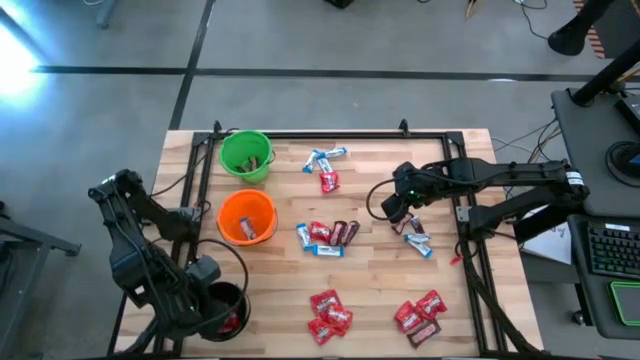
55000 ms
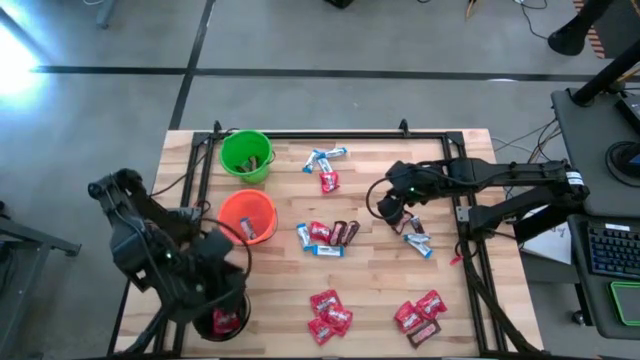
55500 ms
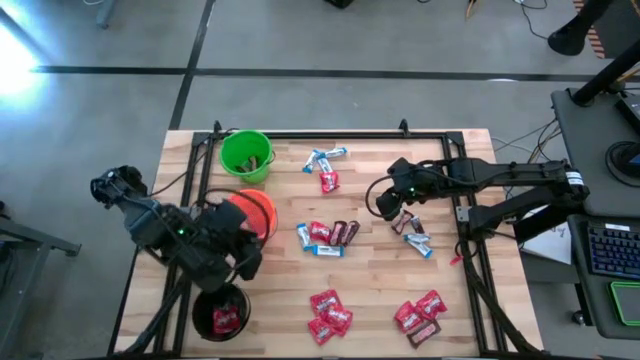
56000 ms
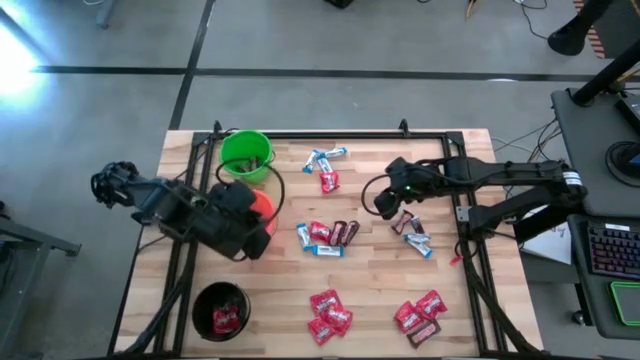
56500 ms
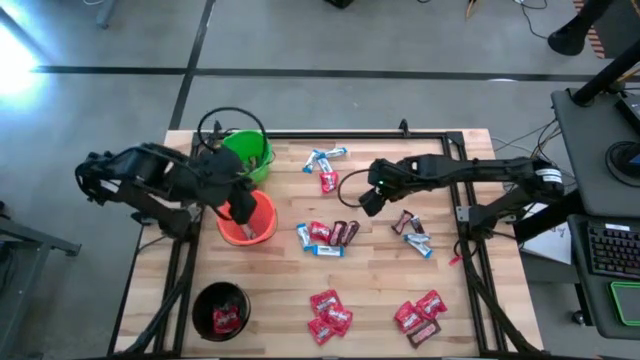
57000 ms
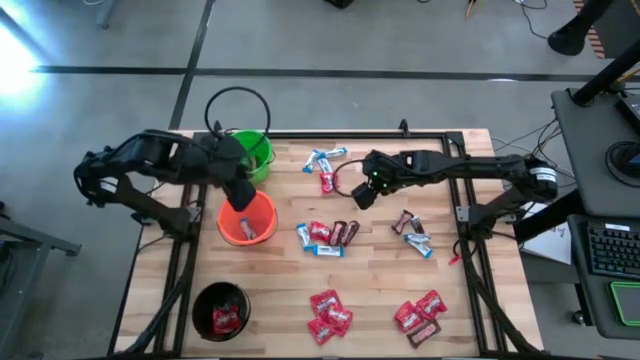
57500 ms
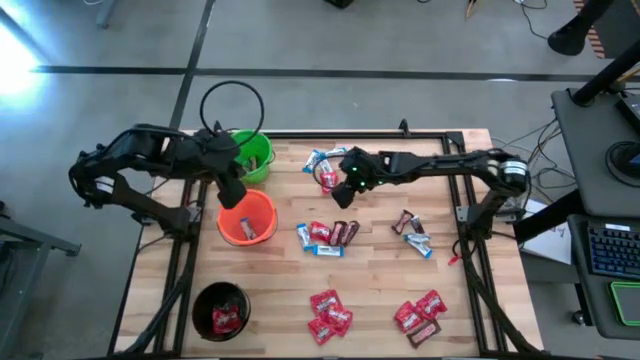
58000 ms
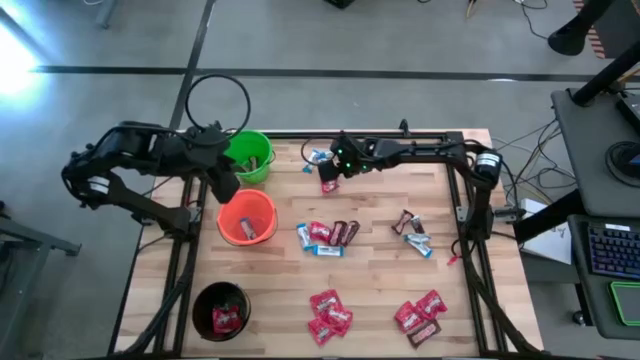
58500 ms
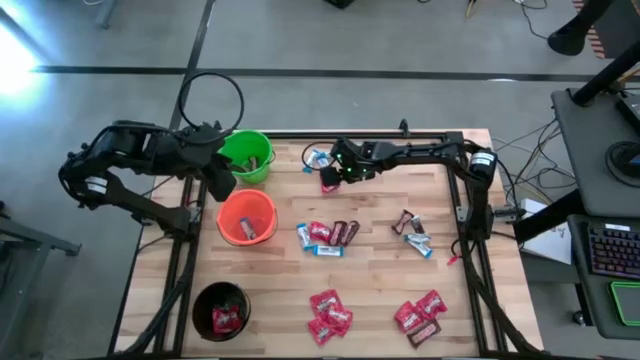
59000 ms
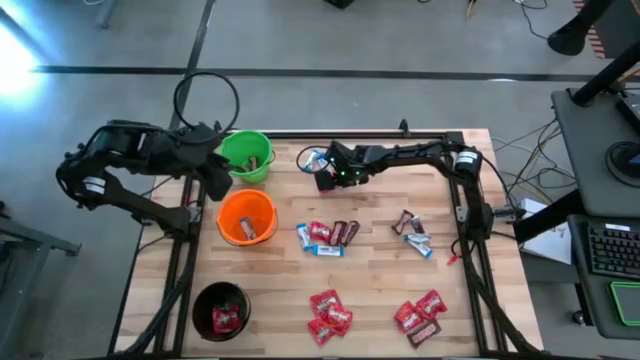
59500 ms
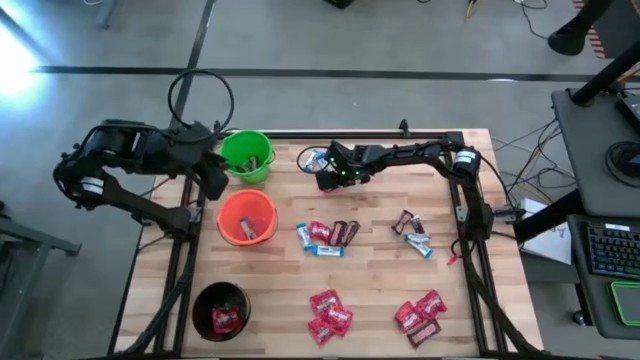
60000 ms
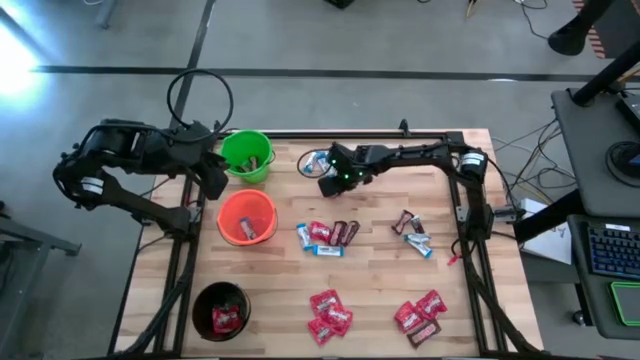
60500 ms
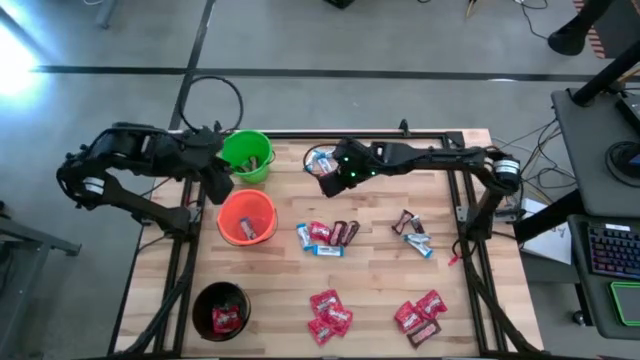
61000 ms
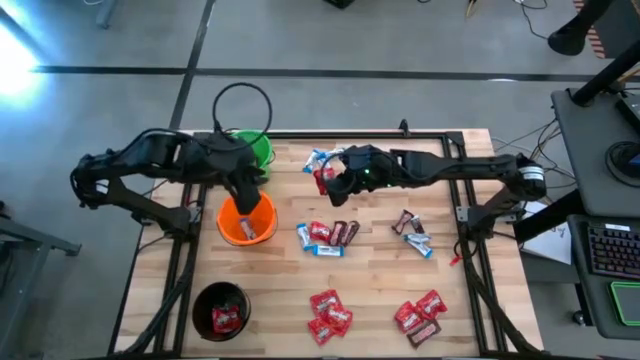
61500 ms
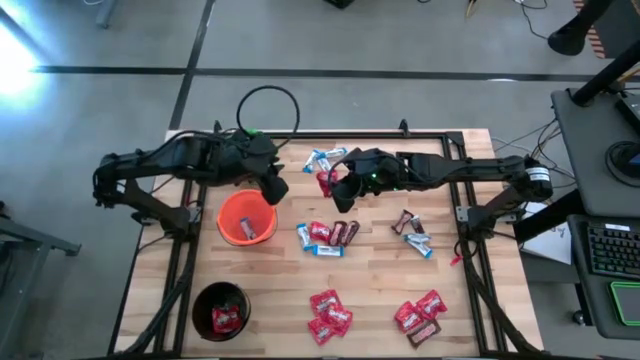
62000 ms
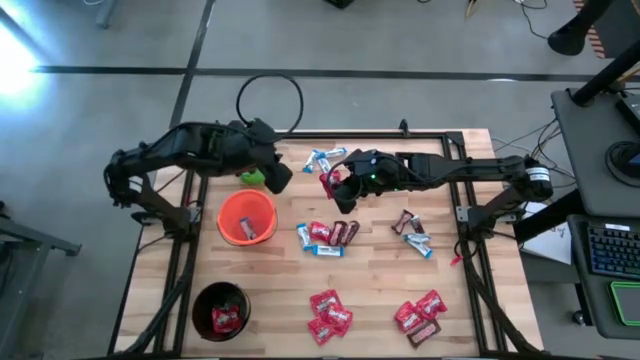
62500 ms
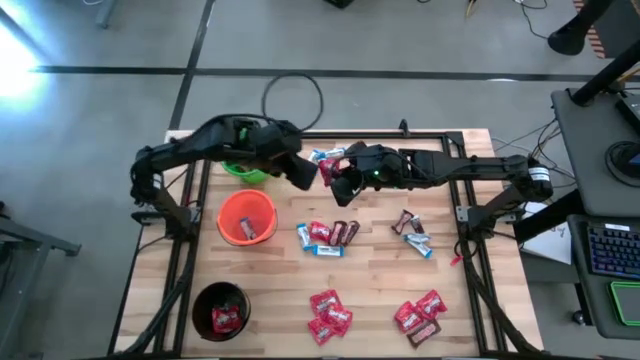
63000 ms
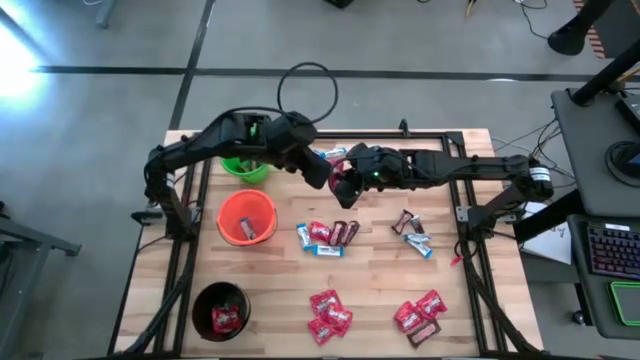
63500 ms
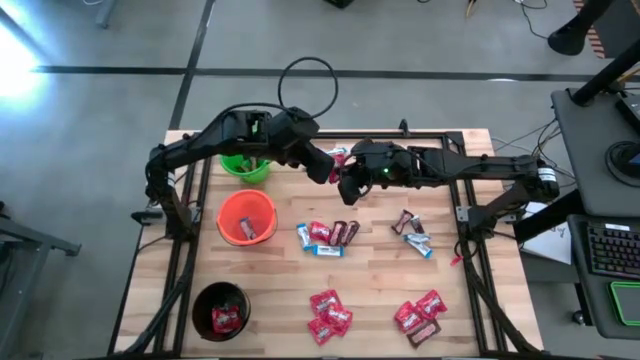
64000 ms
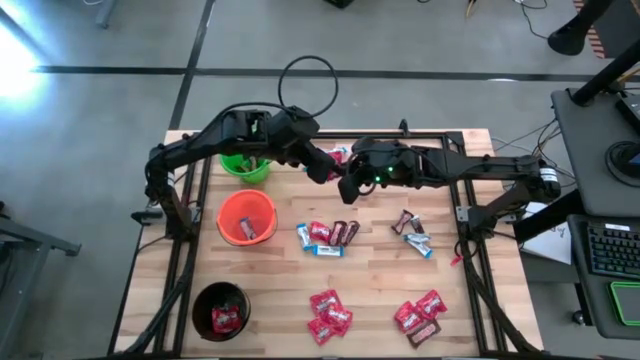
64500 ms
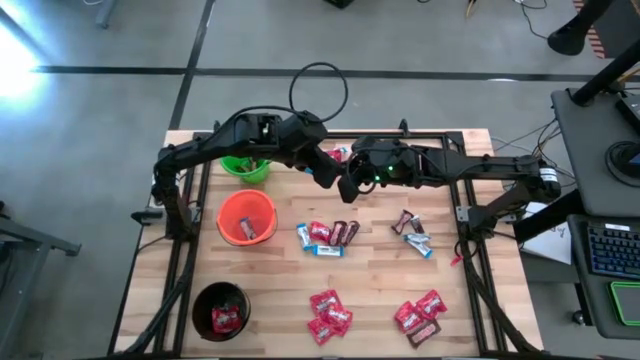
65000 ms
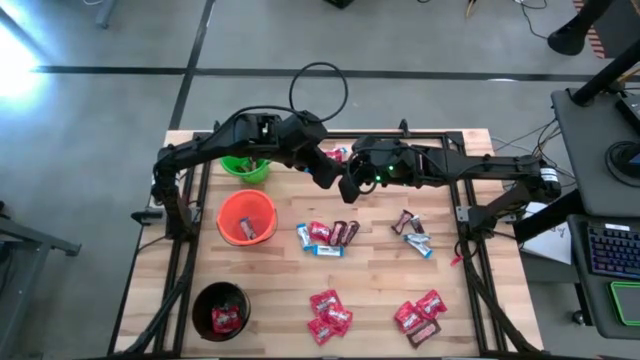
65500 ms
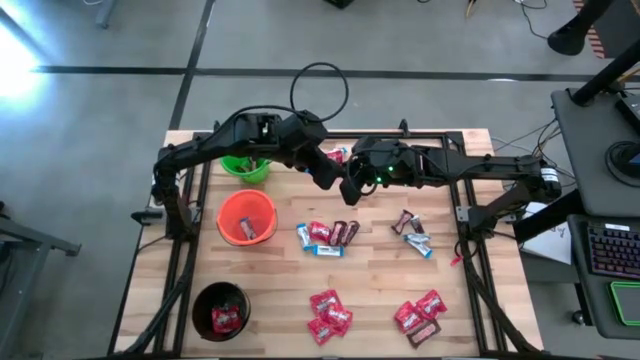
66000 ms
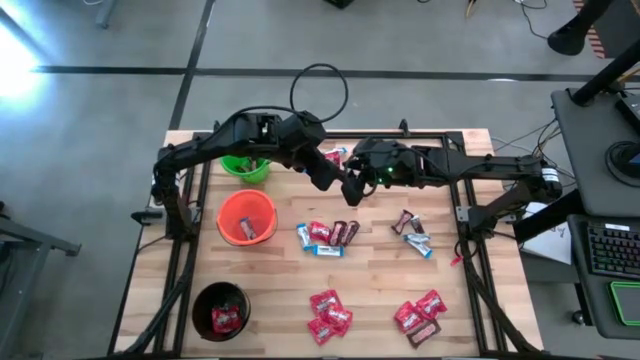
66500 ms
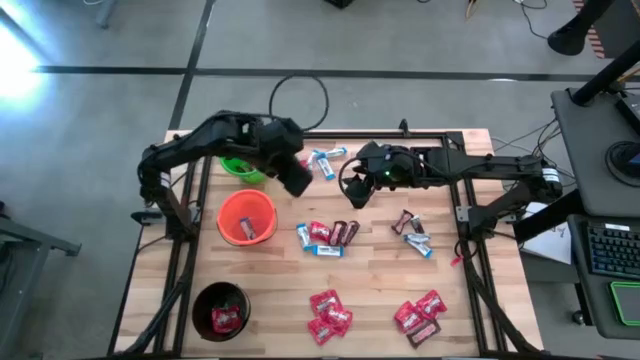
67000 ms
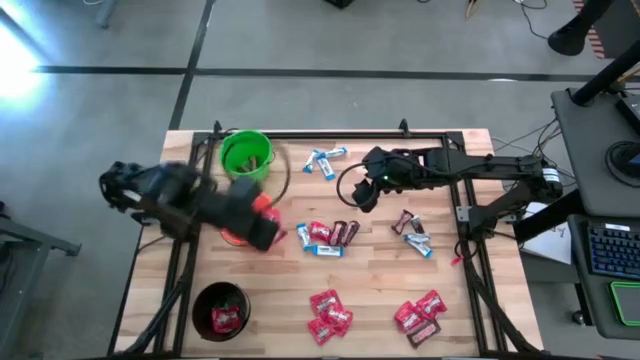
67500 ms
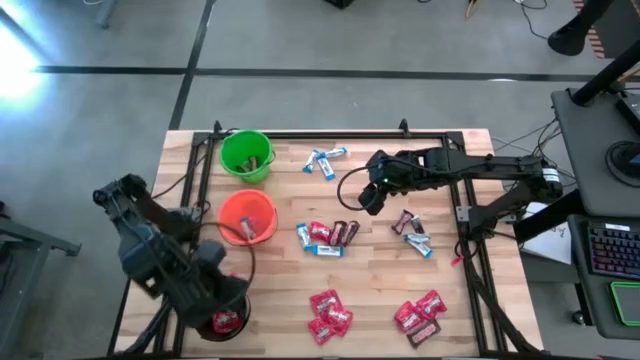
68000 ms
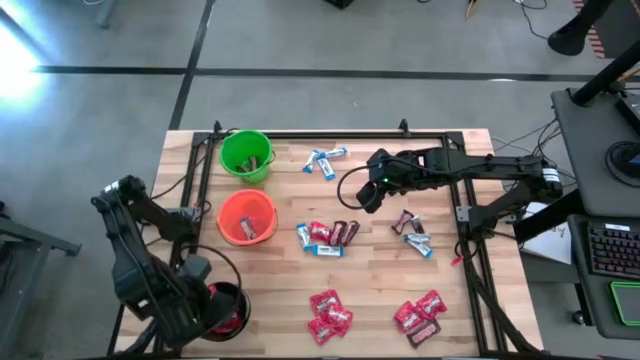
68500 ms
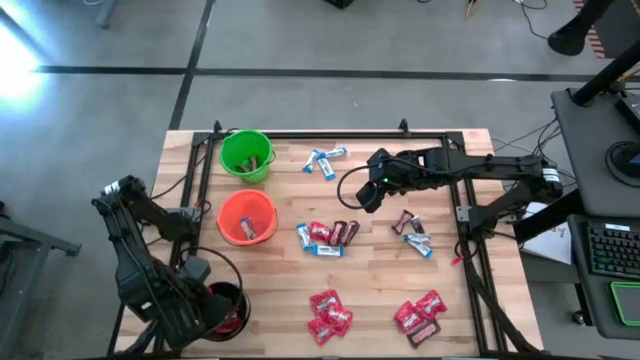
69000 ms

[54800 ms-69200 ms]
Task: Organize candy in baskets
Put the red candy into the black bucket

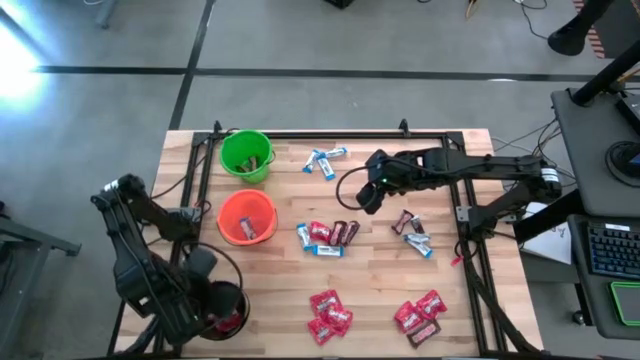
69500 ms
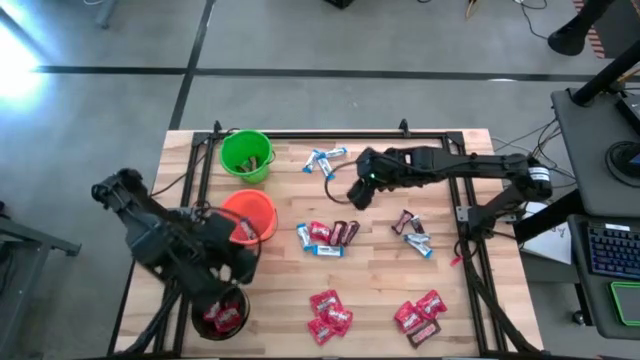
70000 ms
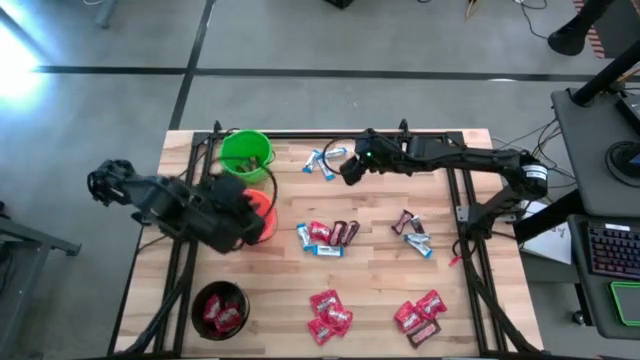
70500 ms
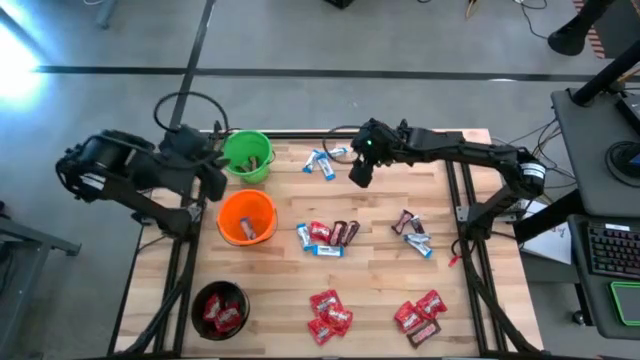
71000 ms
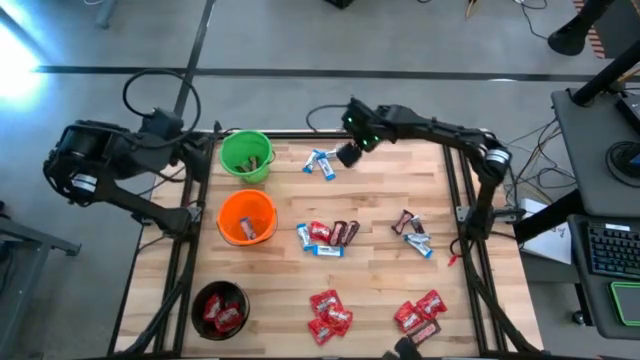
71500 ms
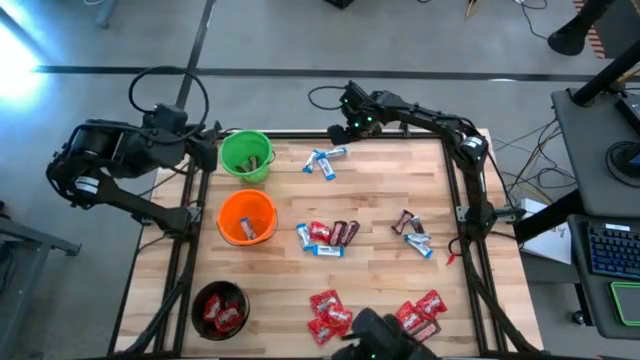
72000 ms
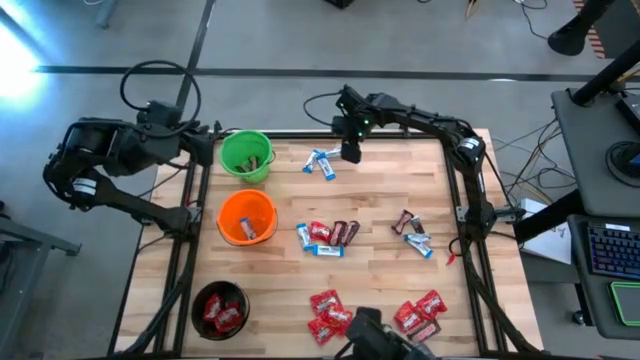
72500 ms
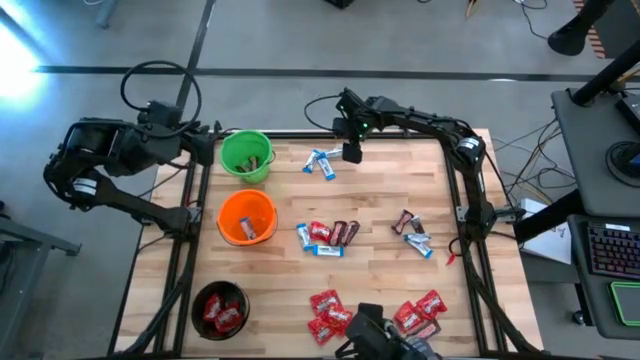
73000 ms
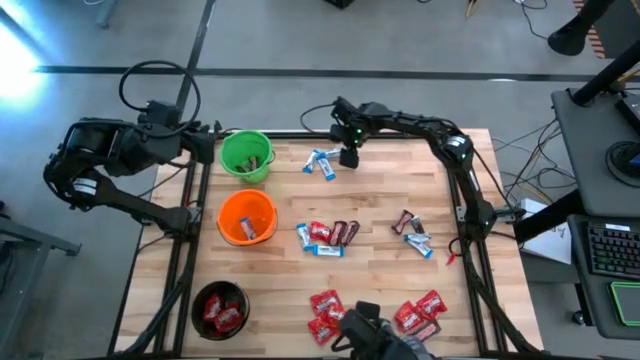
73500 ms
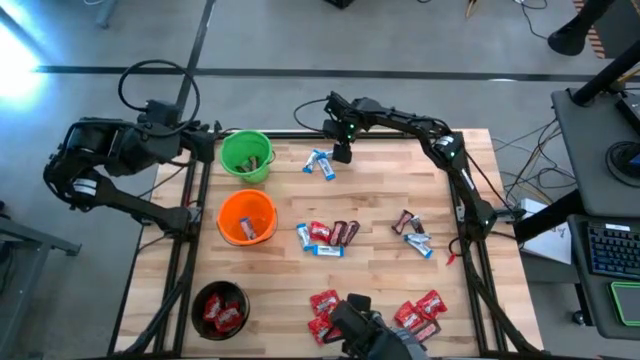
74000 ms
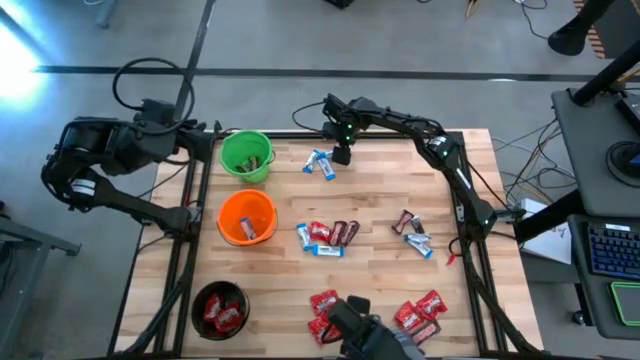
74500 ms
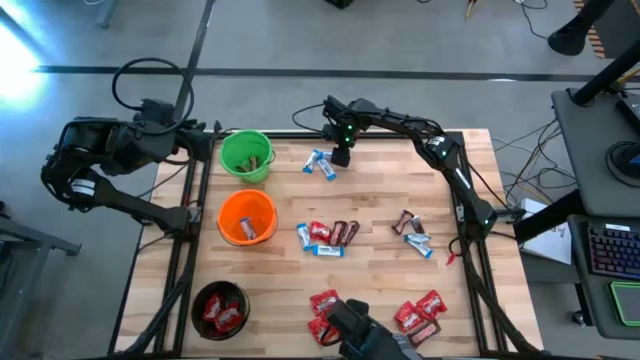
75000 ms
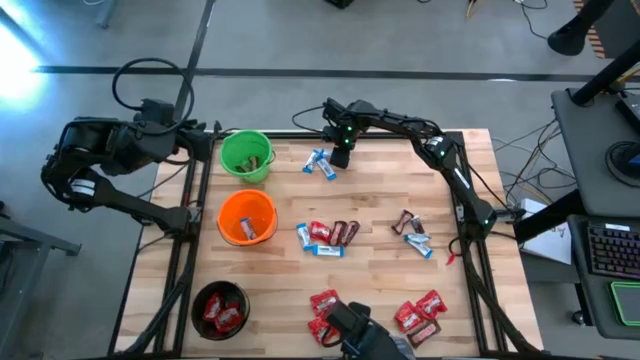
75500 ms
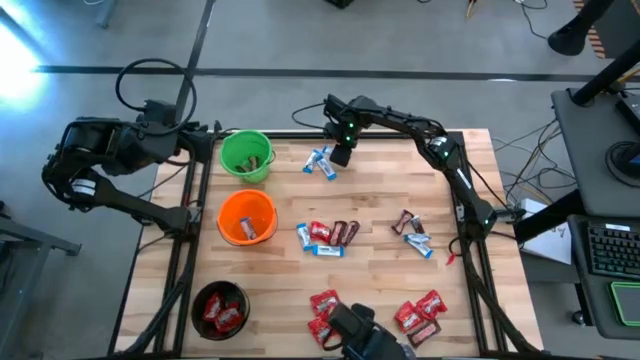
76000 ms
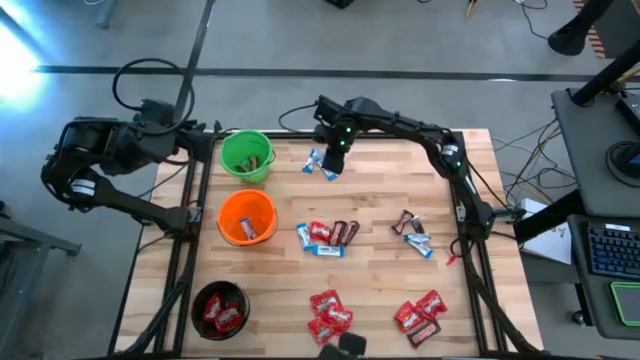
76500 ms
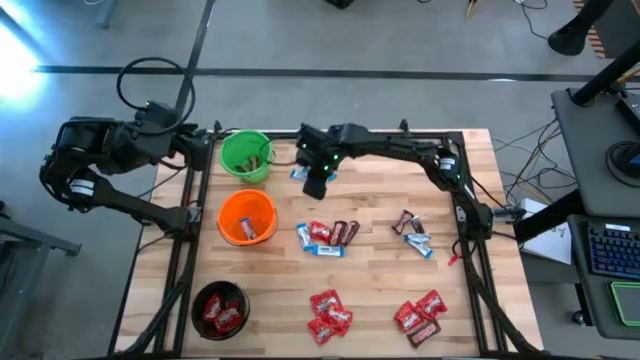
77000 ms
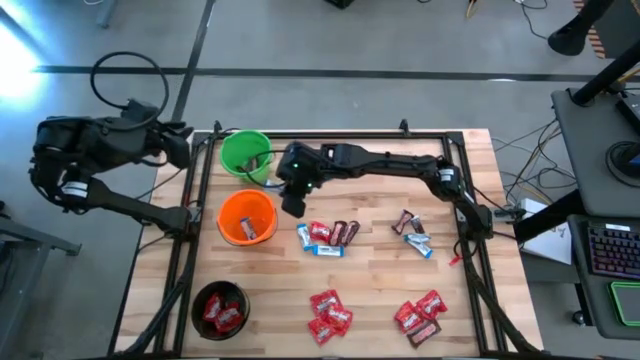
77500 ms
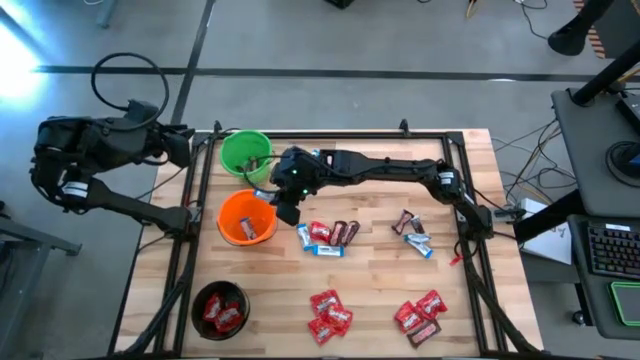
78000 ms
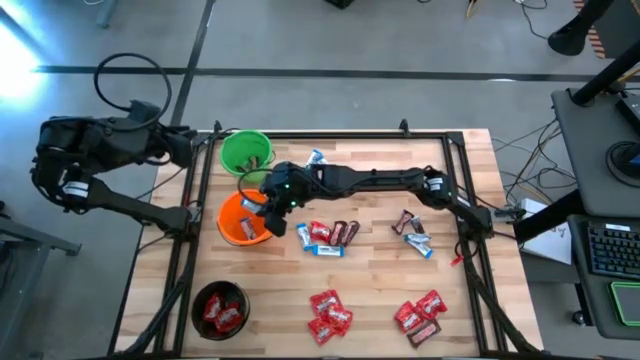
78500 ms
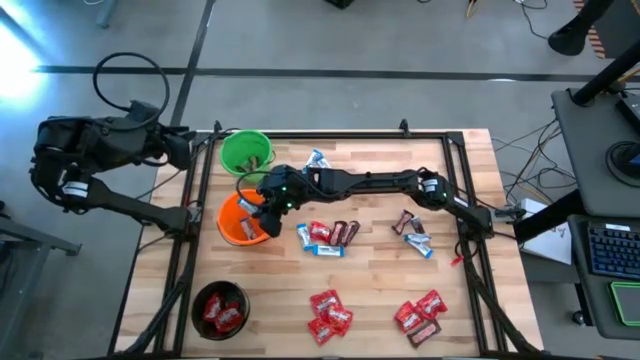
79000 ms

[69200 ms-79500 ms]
Put the white chocolate into the orange bucket
